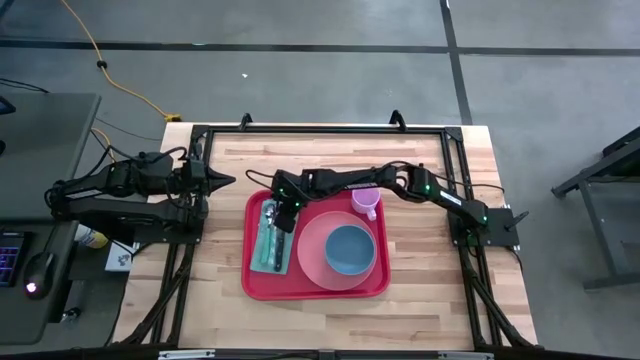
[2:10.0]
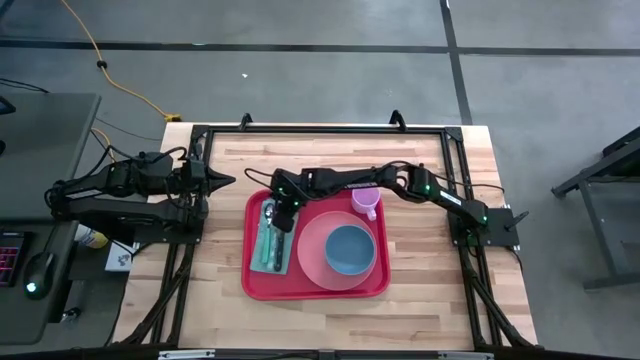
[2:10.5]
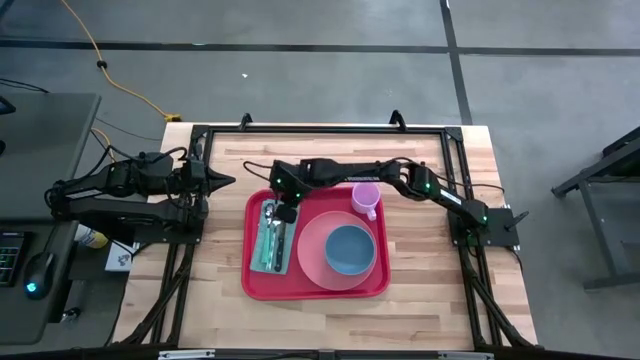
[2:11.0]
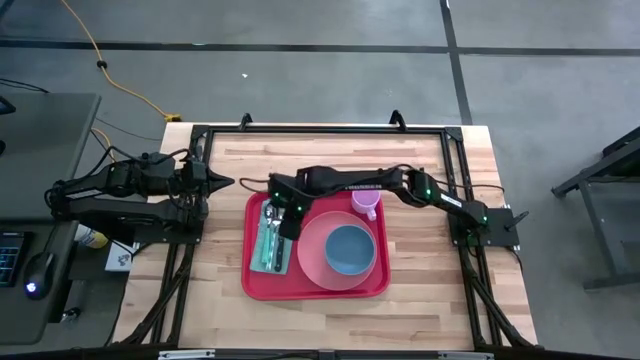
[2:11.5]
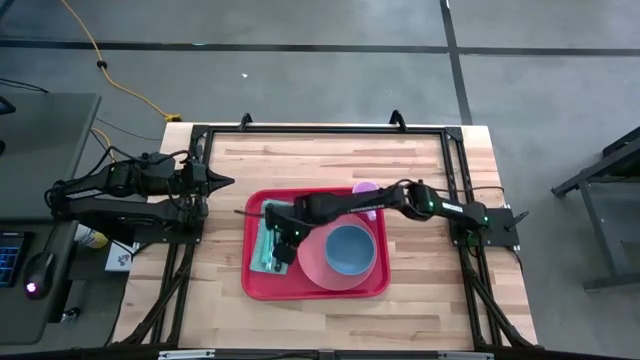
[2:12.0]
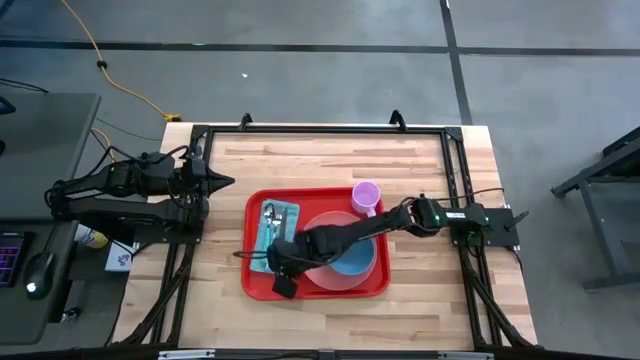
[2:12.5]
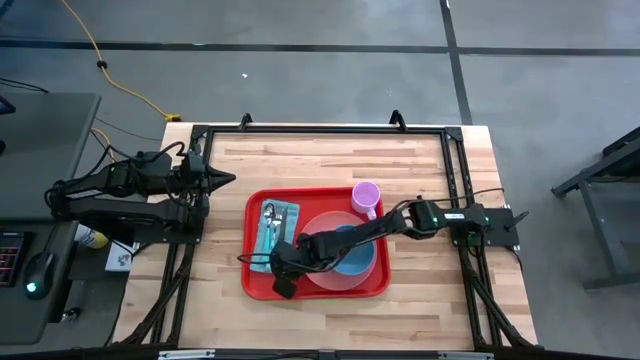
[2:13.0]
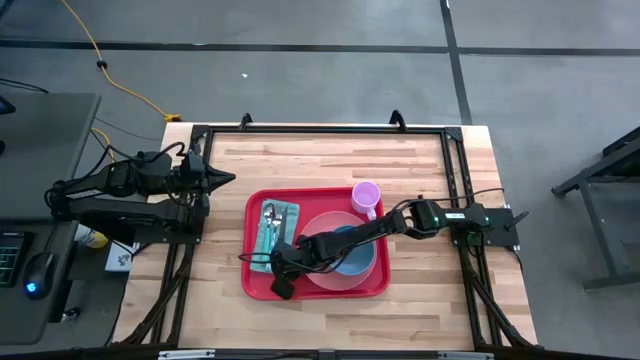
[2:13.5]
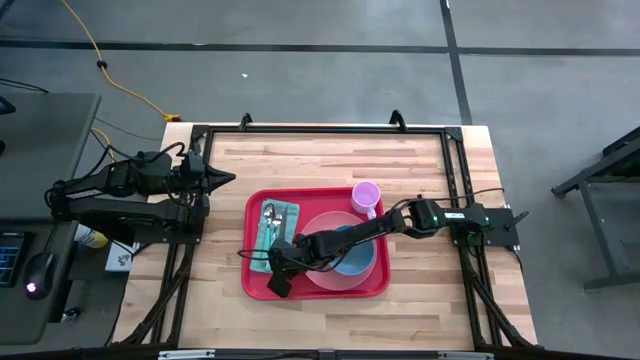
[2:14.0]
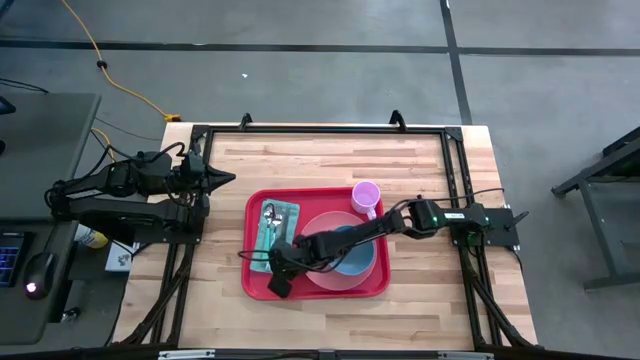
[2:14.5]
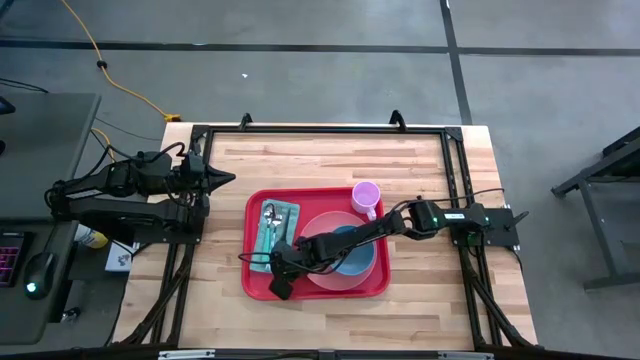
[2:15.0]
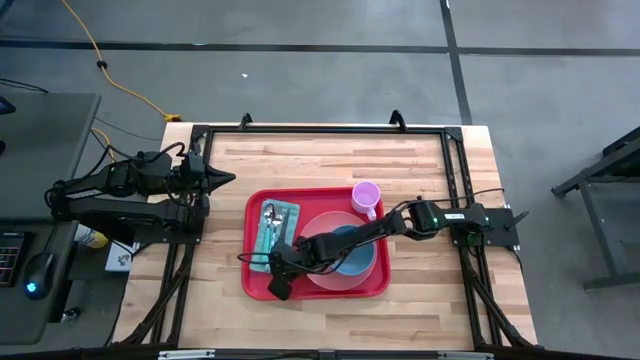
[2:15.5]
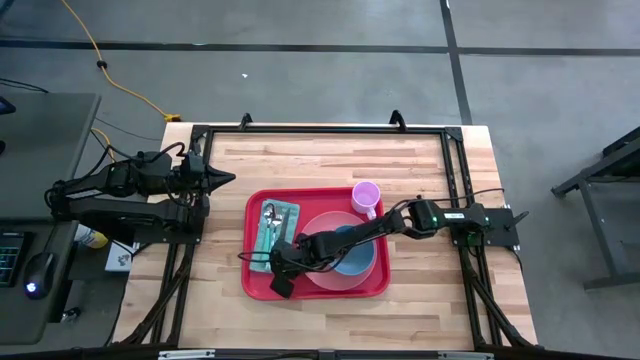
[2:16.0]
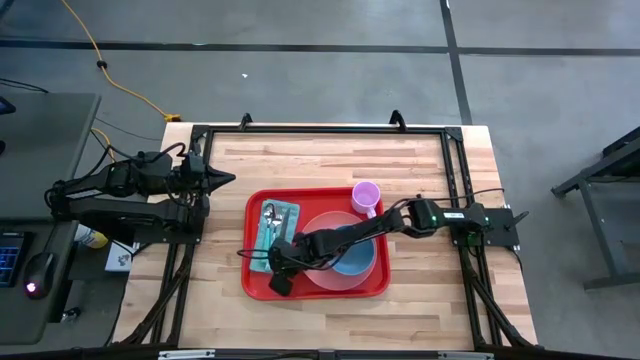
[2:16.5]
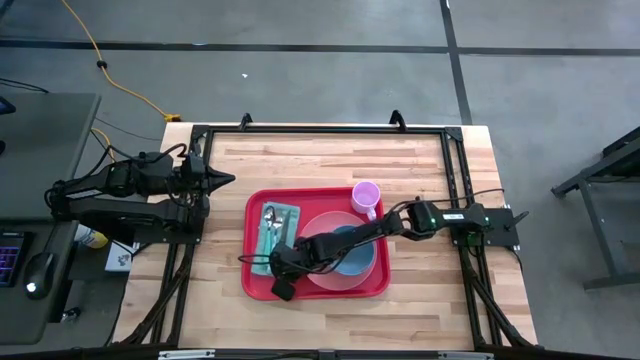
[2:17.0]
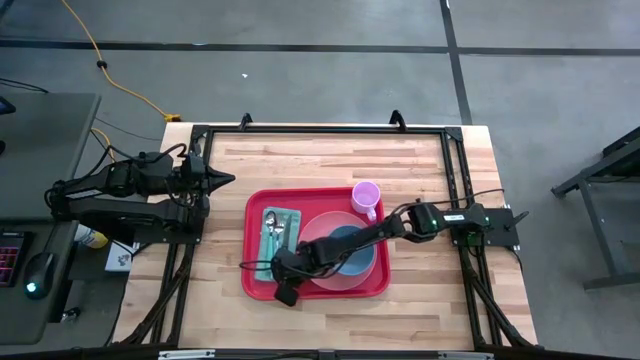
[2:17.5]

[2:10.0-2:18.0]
Task: Set up tray
Adjust the blue napkin to align with the pink plate

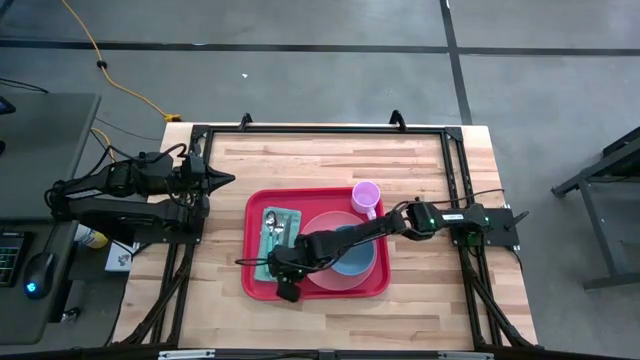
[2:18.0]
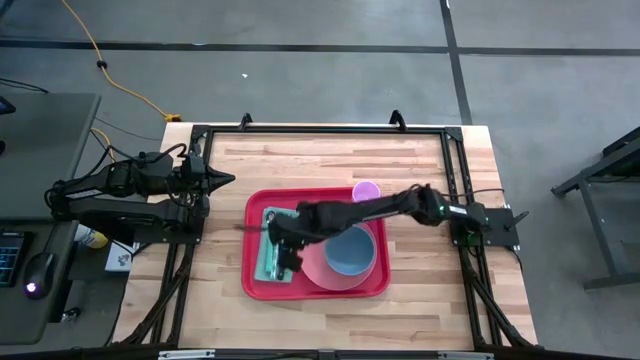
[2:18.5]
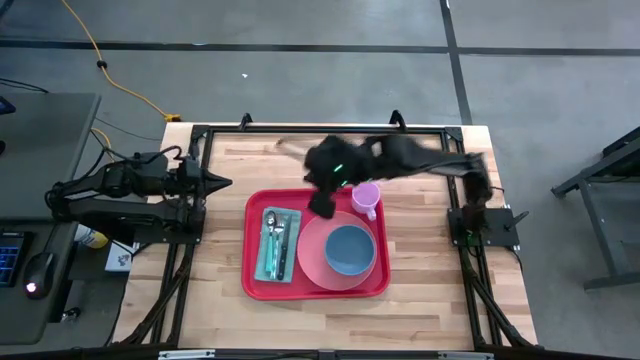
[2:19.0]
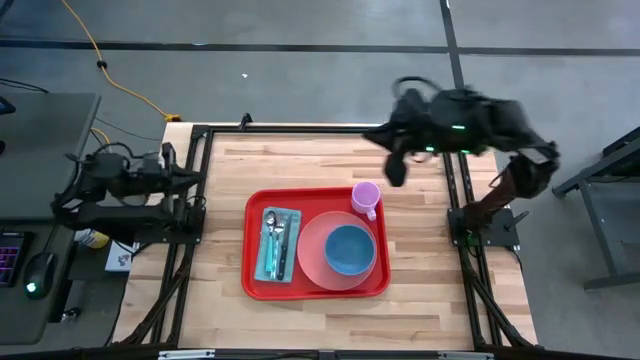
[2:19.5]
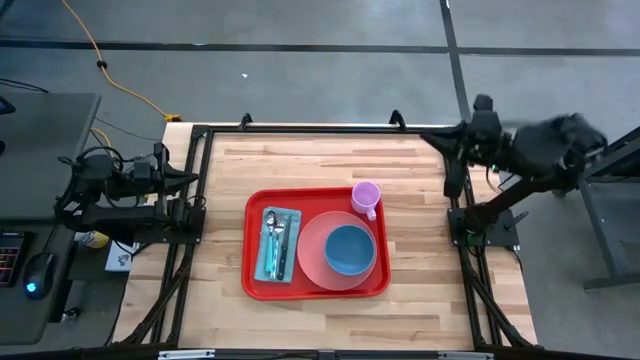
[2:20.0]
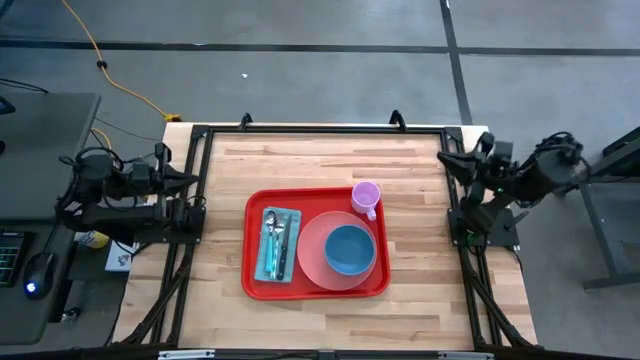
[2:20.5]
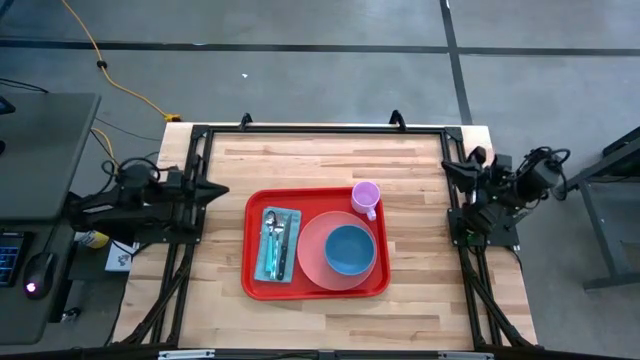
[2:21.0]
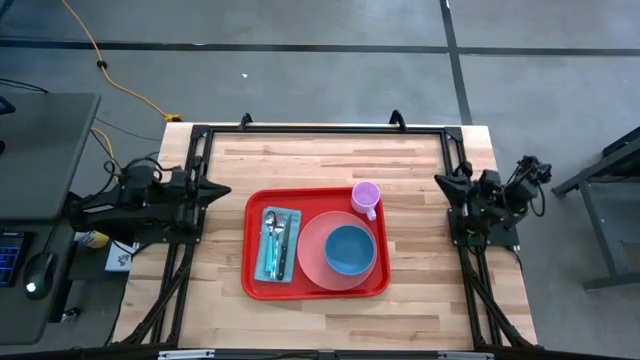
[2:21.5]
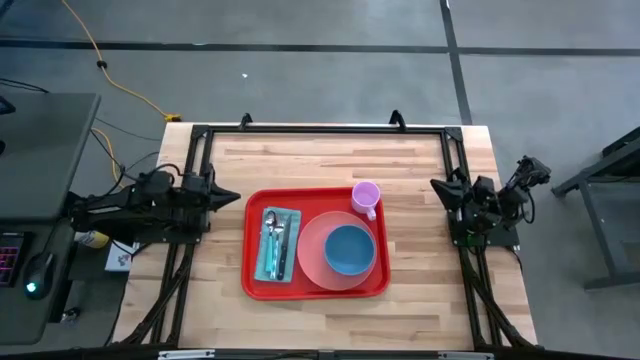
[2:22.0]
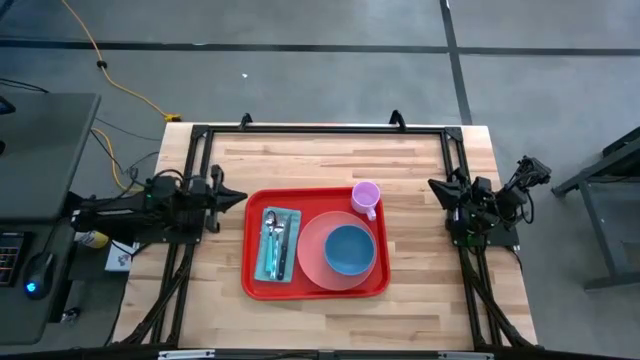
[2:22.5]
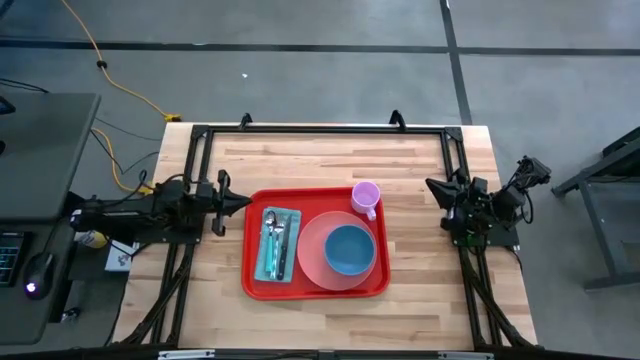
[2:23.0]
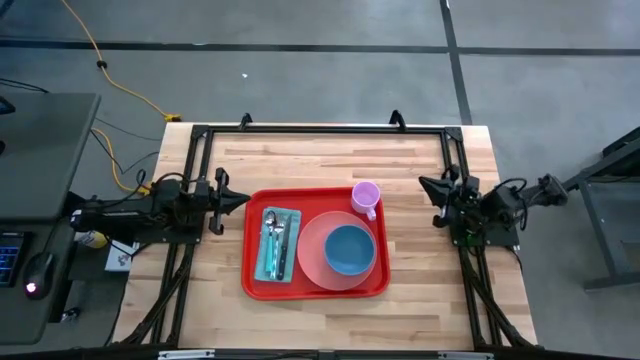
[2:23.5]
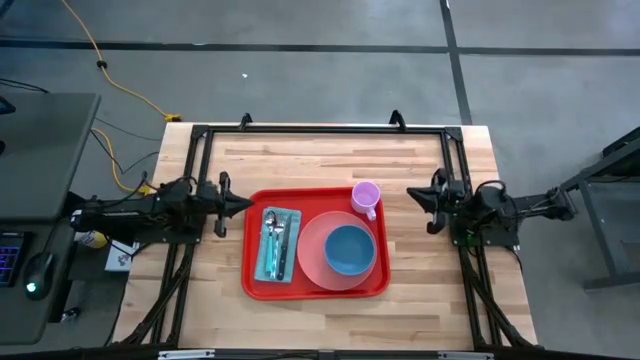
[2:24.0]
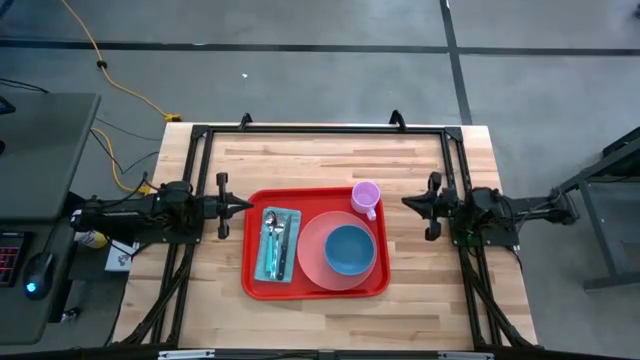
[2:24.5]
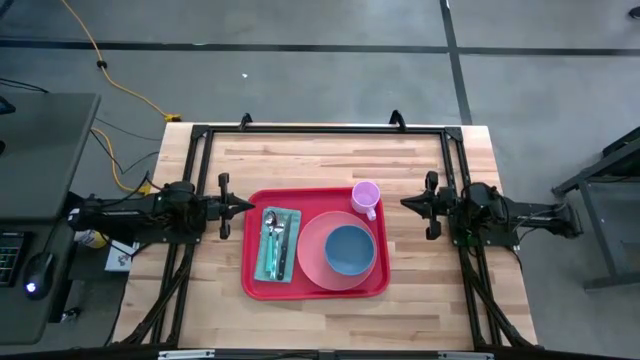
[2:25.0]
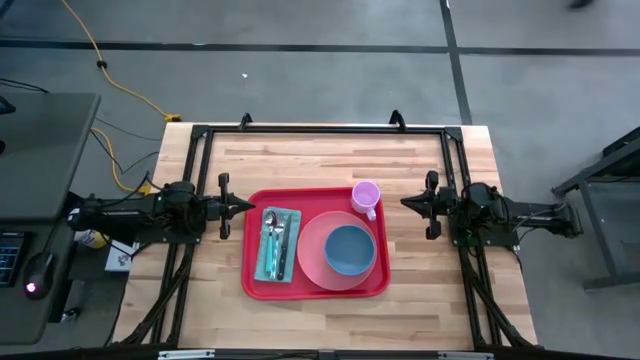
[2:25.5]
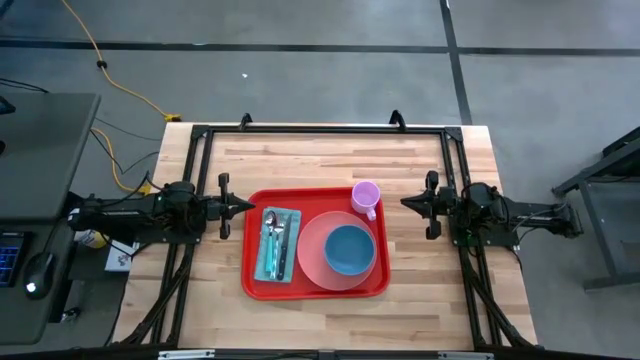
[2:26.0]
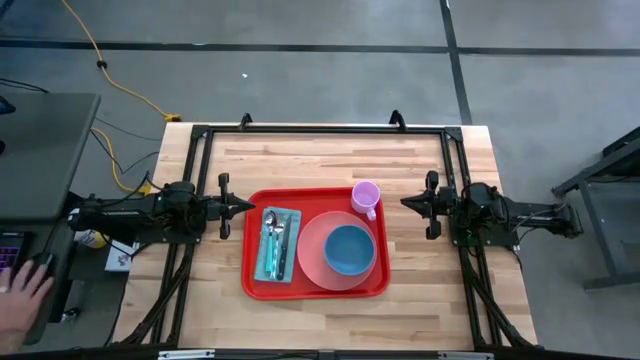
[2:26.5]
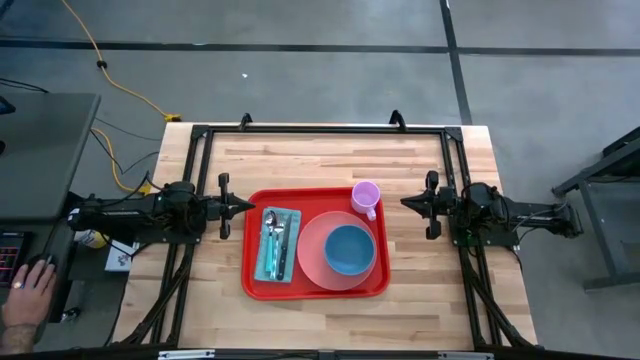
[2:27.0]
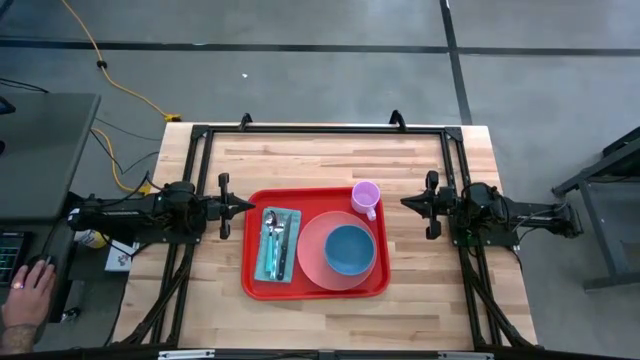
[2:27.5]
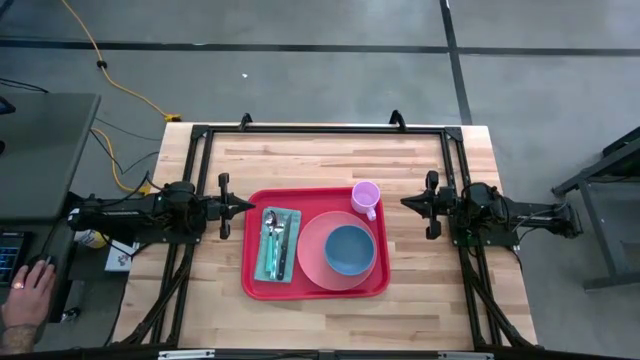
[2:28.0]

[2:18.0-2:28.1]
Return to Home Position

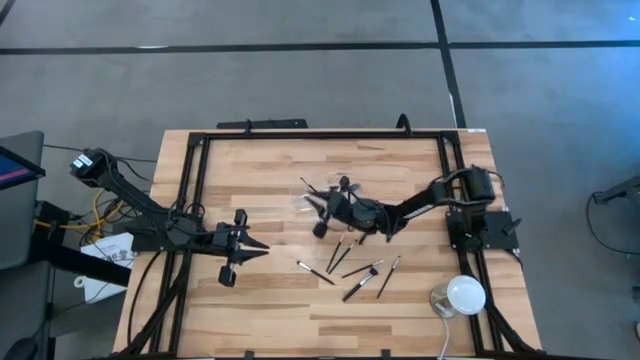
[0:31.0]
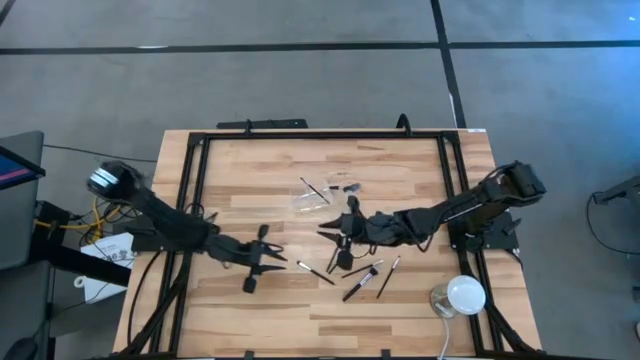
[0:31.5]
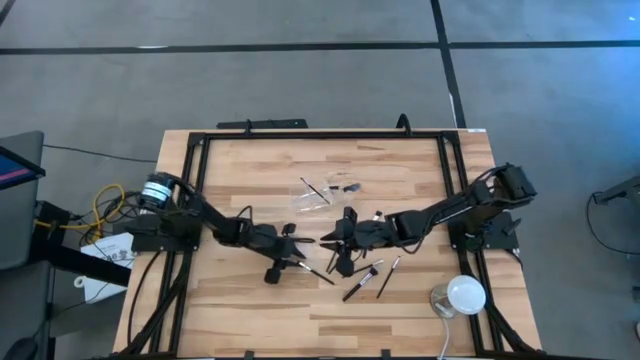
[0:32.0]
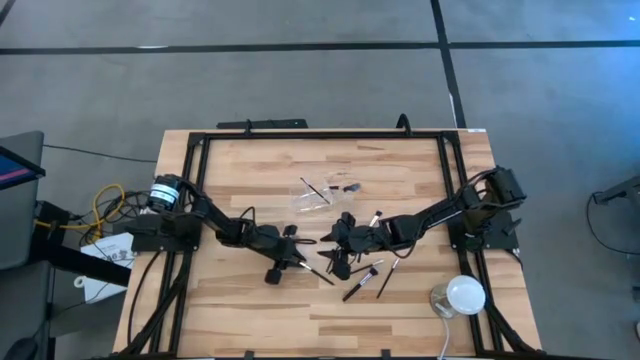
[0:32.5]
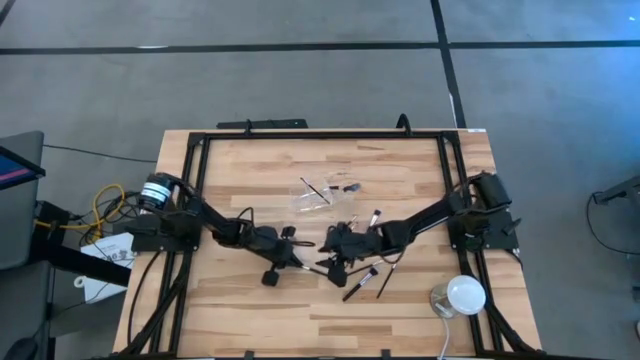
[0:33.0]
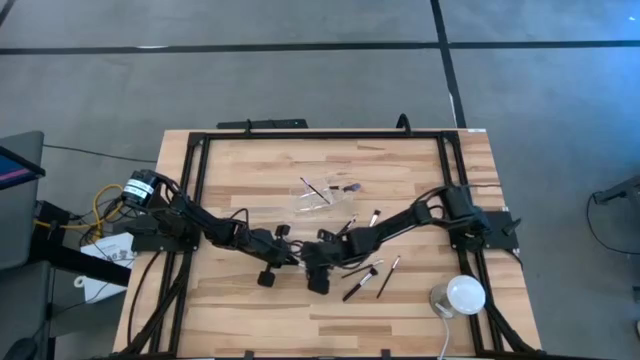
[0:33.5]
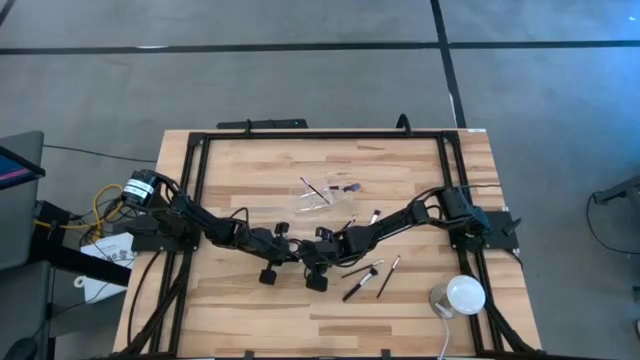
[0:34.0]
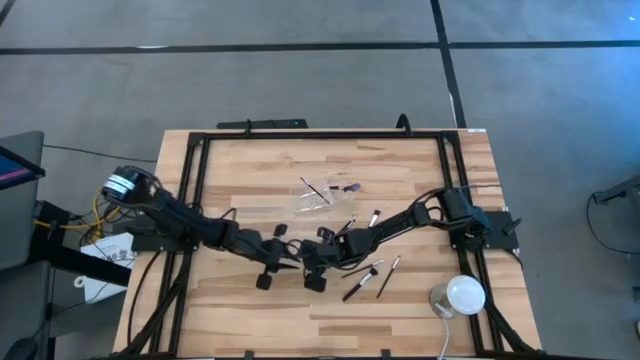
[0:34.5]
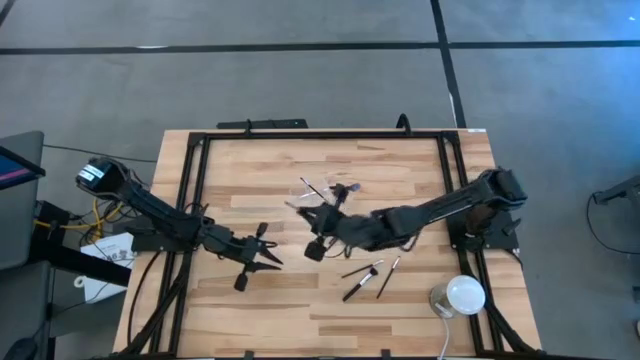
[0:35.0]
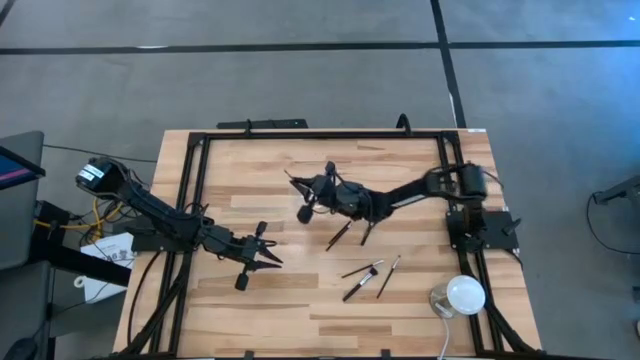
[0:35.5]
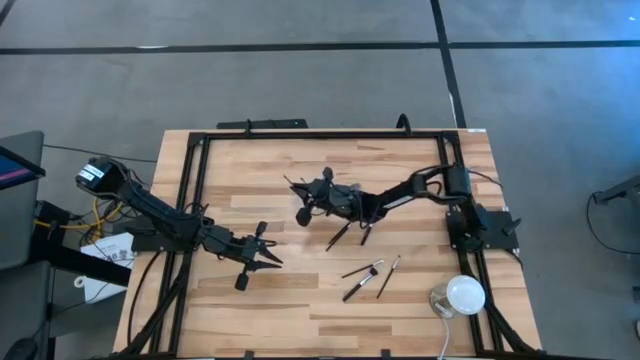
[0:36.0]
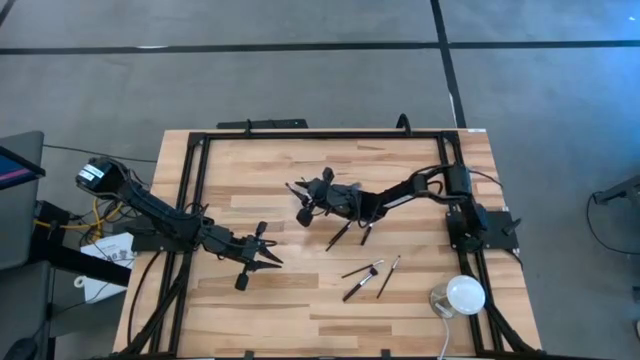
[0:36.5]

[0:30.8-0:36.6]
Task: Put items in baskets/containers
Put the eyeshadow brush into the transparent organizer
